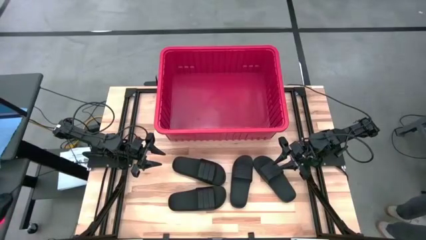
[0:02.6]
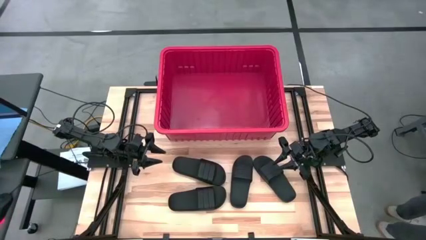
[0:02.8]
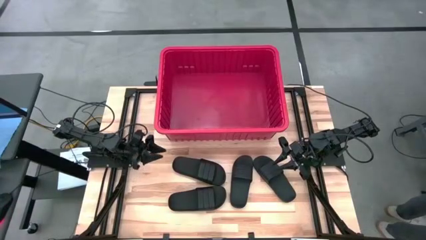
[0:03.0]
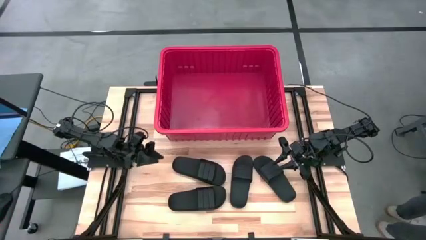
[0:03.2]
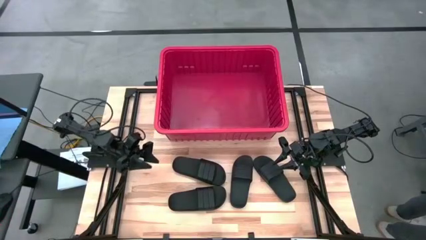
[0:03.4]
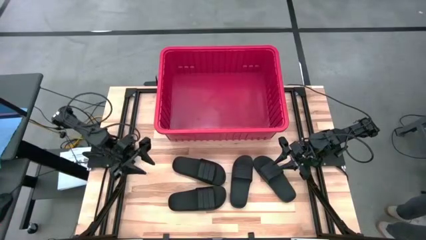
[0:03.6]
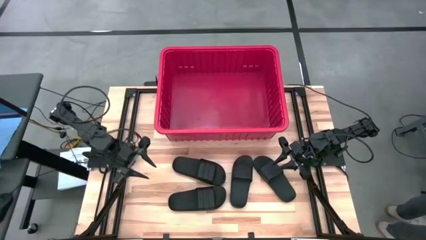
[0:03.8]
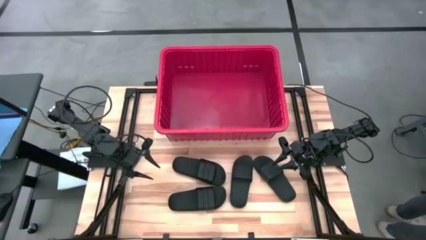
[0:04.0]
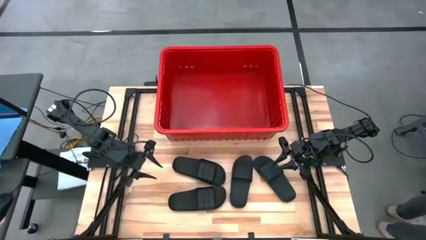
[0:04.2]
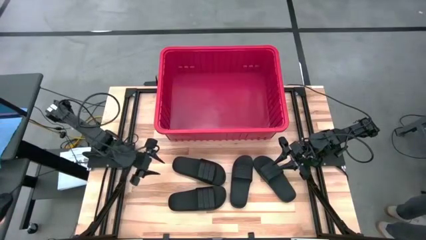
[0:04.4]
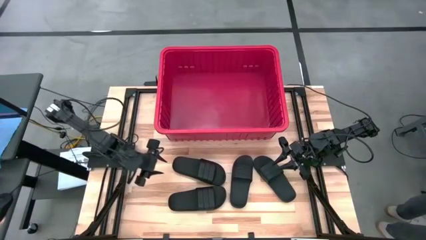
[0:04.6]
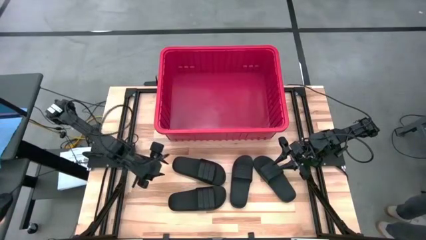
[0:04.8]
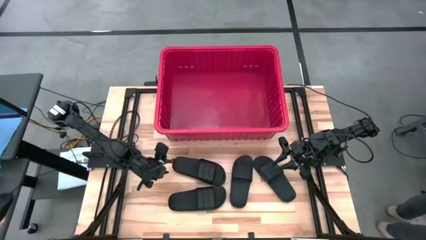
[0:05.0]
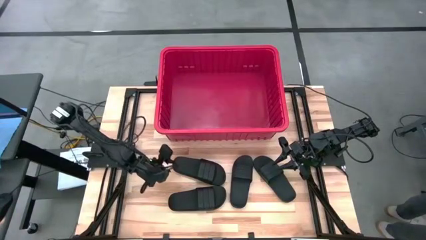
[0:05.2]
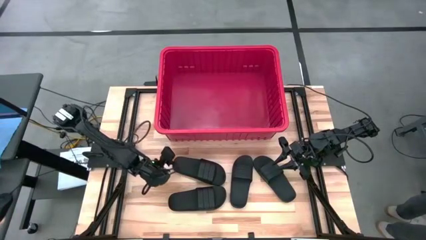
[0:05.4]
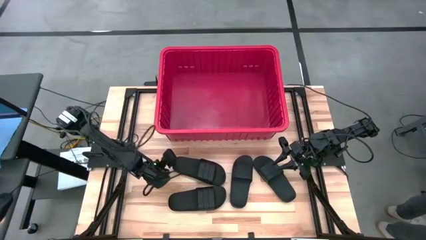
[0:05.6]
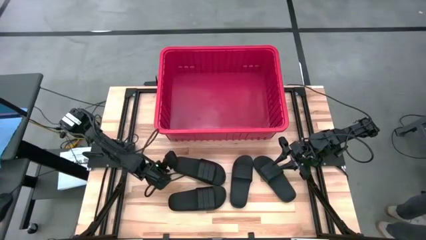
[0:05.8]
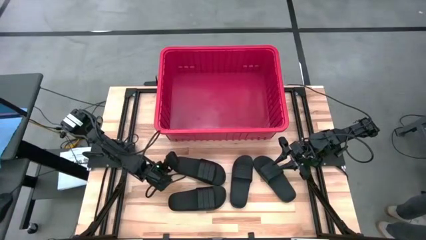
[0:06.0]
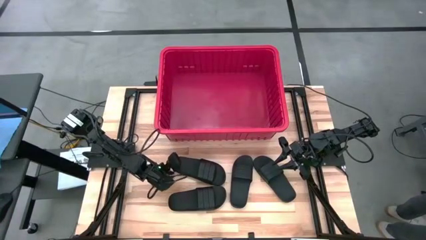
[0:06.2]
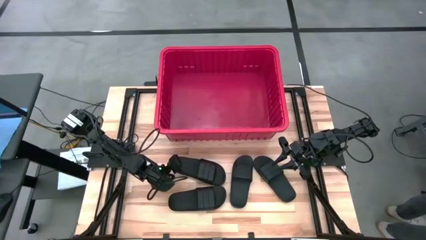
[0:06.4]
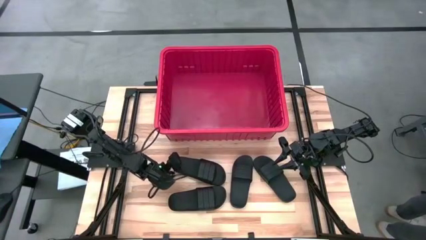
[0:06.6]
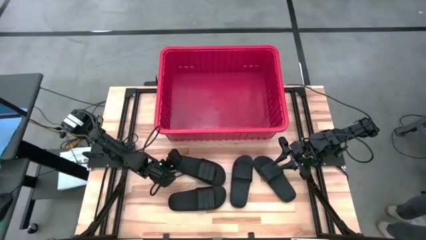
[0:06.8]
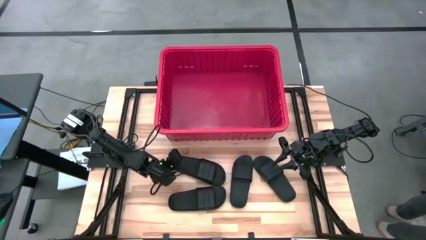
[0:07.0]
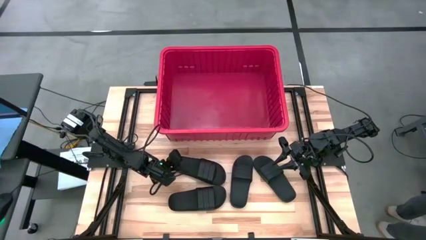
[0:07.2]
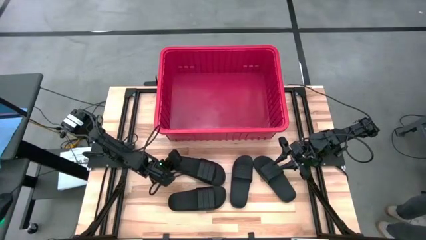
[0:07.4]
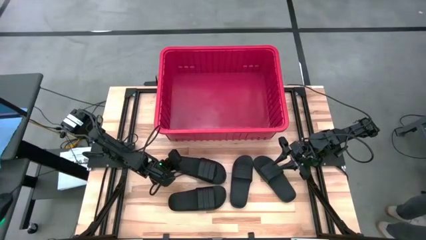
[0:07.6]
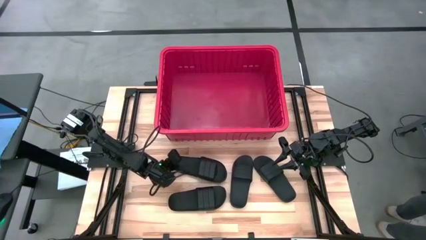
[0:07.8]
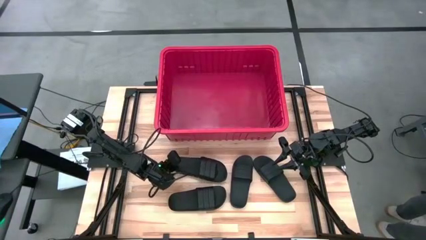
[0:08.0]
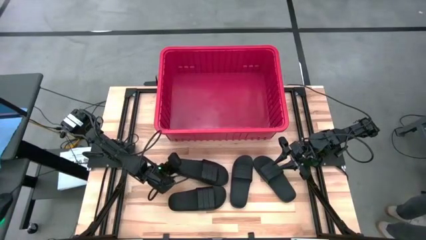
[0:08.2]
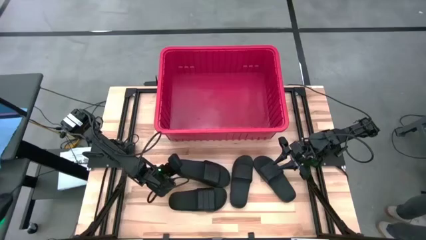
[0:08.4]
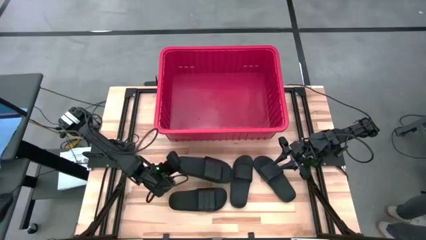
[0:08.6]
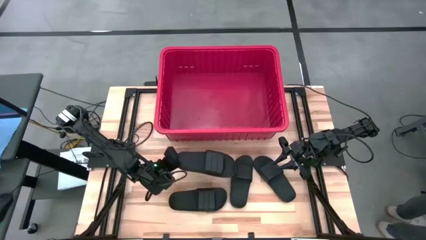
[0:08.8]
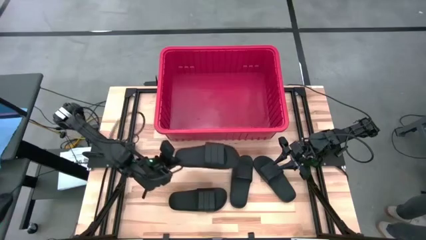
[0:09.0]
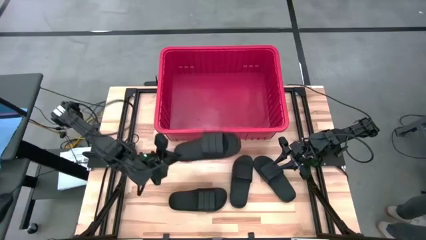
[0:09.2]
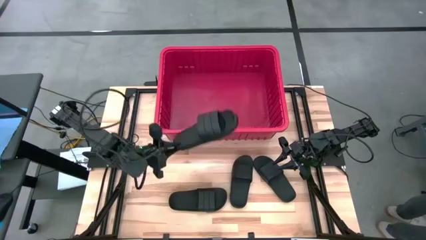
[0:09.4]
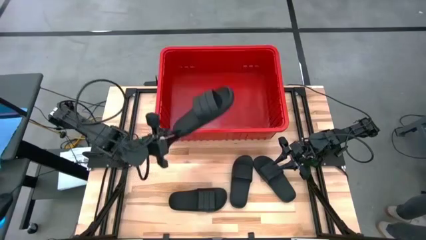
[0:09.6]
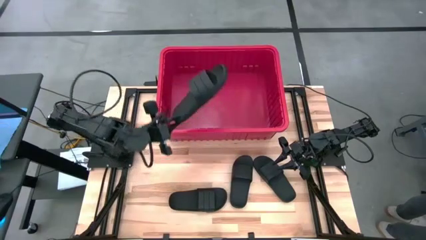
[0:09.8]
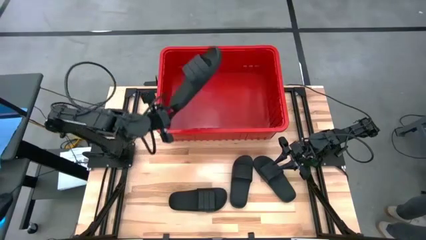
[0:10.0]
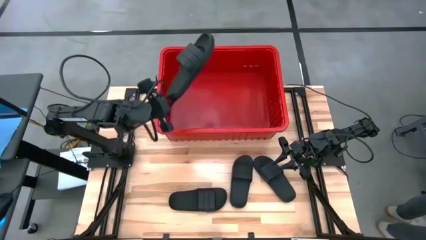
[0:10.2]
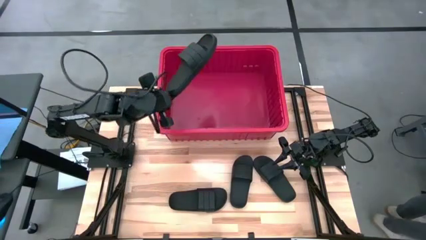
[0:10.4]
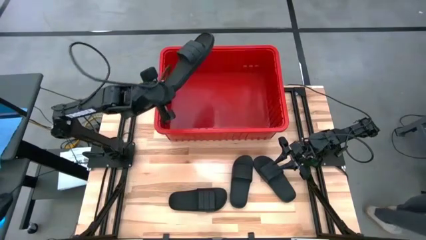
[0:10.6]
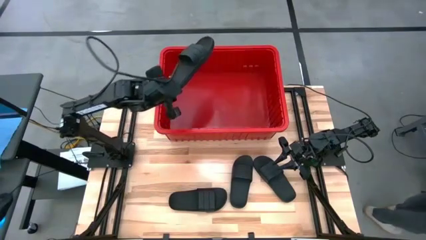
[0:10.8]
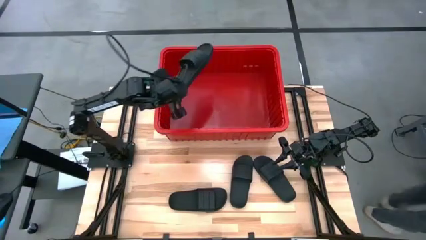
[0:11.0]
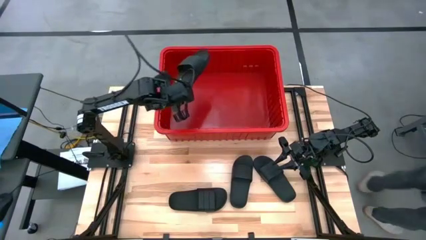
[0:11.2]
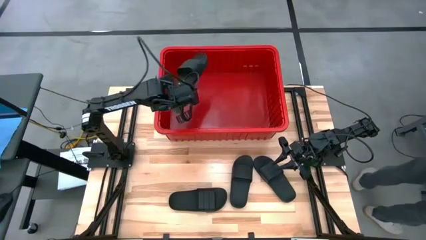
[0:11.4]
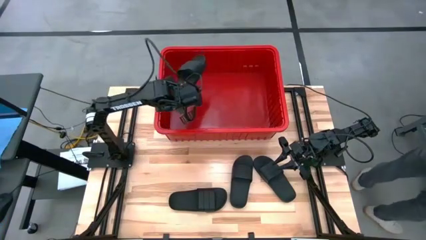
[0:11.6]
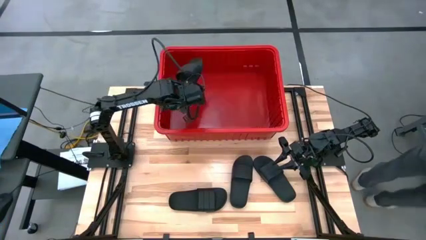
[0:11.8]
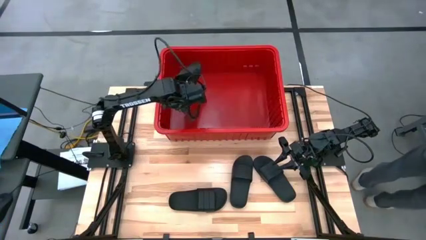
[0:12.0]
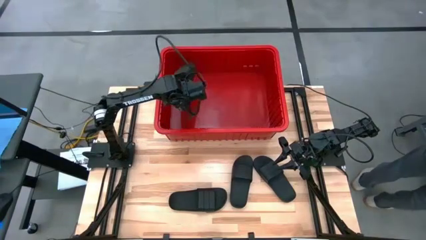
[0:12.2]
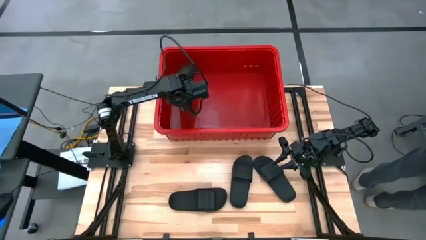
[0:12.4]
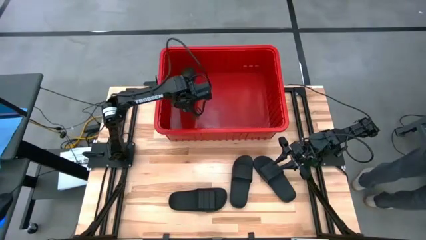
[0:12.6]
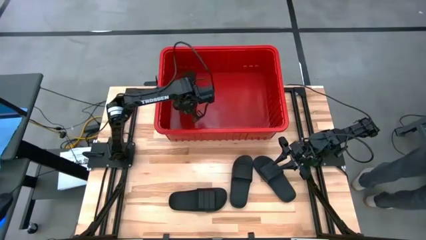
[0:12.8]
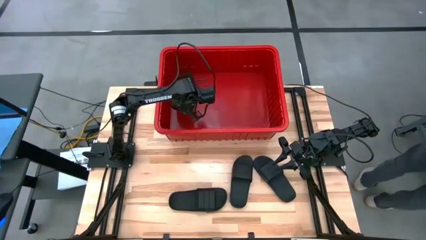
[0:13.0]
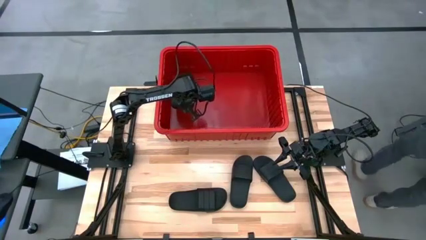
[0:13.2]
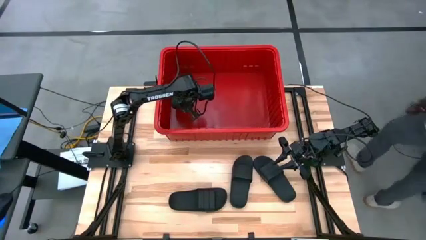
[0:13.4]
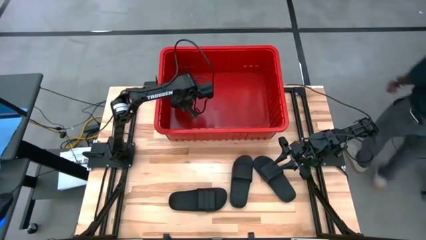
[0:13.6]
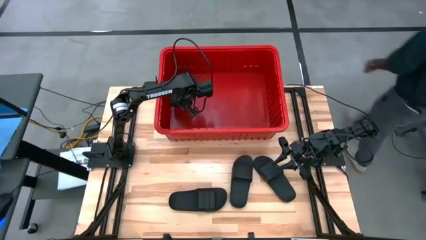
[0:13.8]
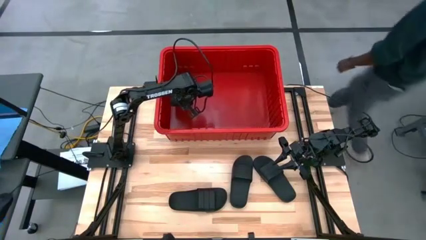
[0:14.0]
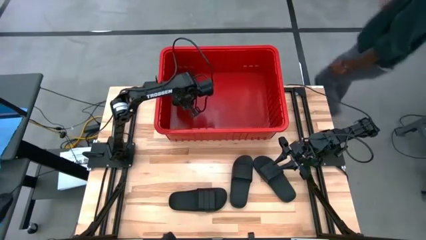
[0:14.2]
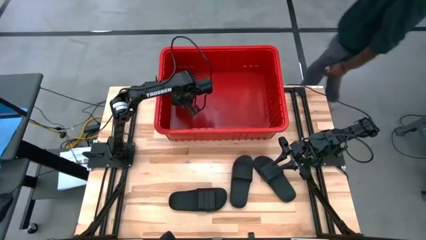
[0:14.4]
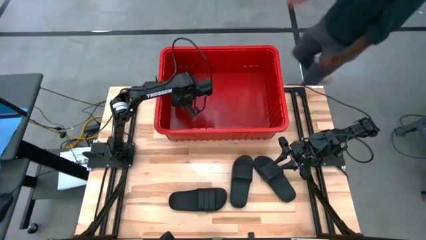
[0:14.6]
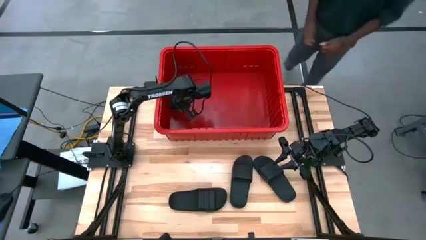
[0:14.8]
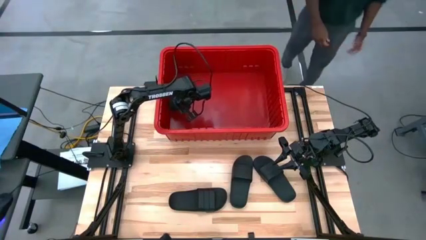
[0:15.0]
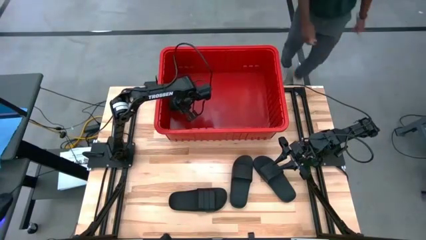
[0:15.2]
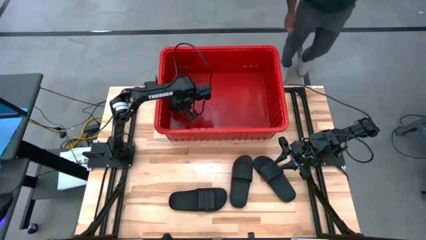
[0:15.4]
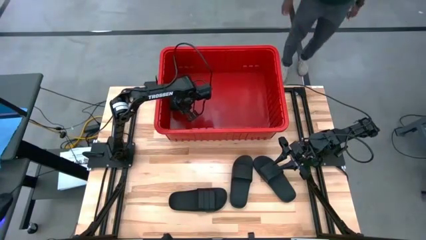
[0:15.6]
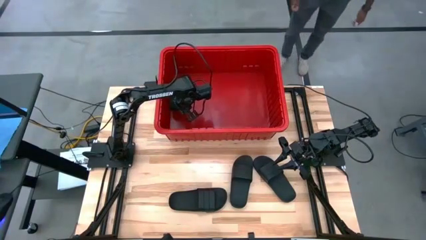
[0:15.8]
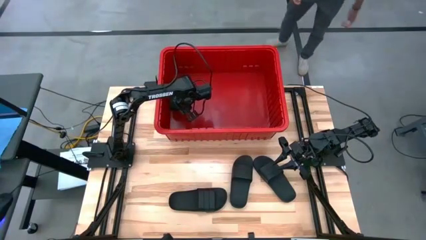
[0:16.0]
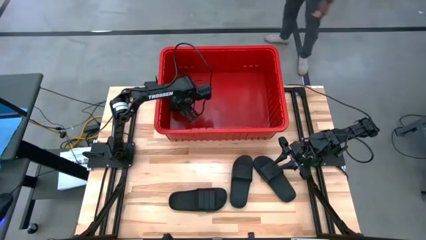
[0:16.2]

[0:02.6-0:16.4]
Task: Pick and place slides into bin
Put the black slide into the red container
